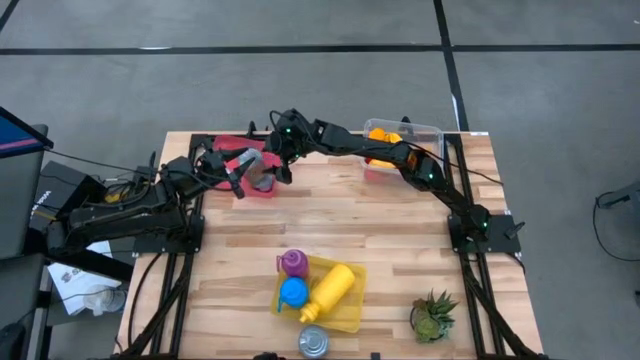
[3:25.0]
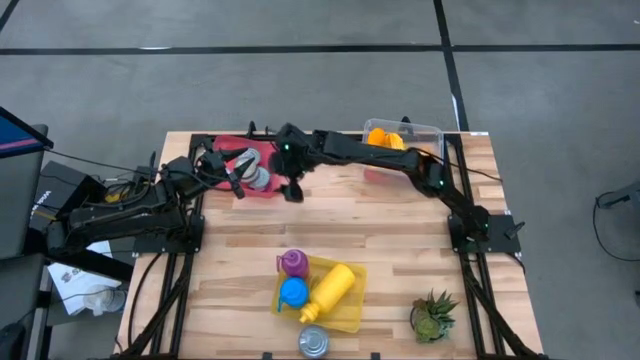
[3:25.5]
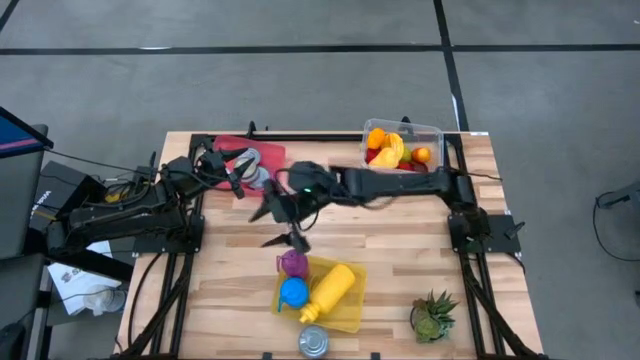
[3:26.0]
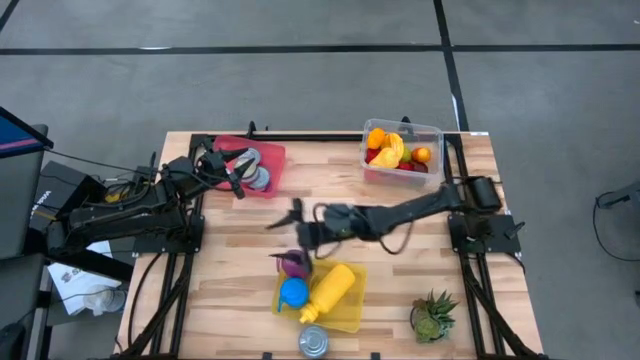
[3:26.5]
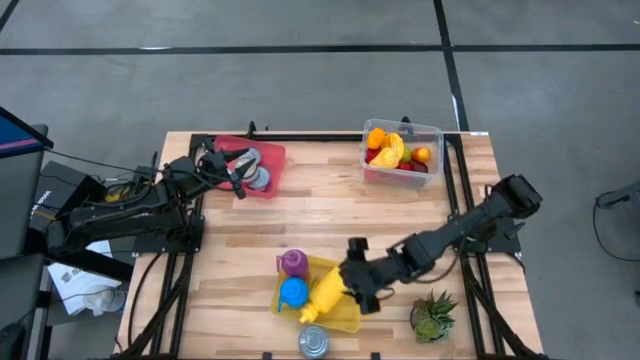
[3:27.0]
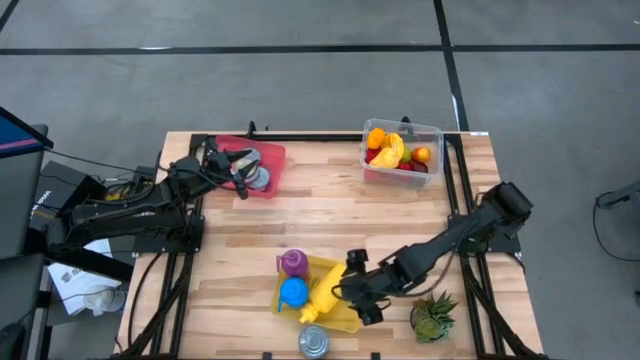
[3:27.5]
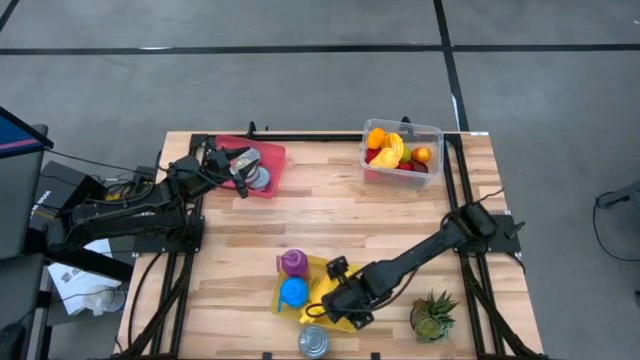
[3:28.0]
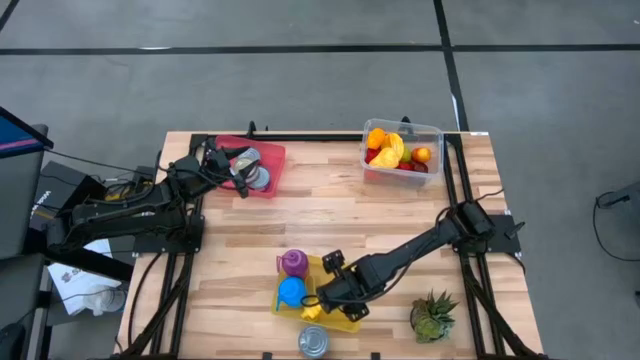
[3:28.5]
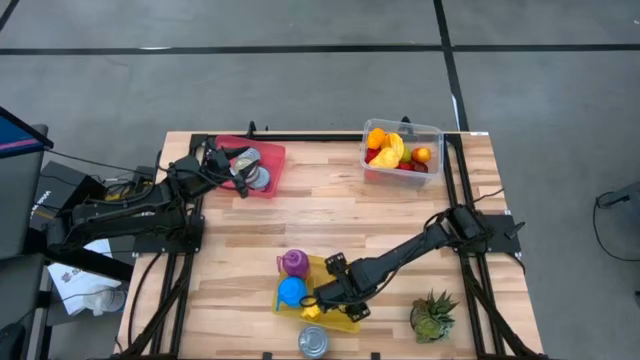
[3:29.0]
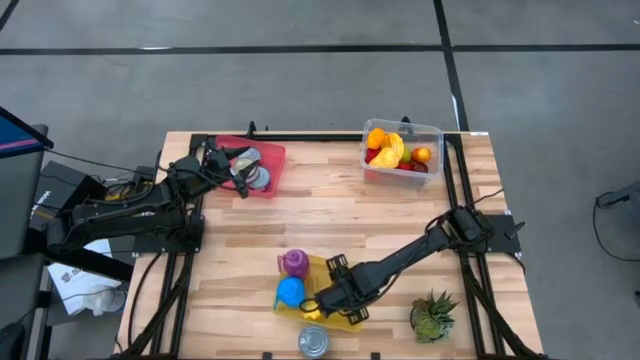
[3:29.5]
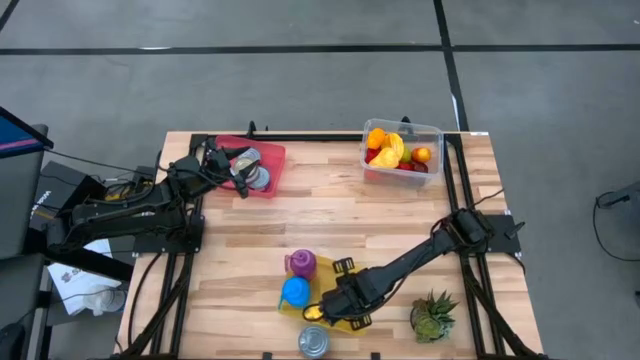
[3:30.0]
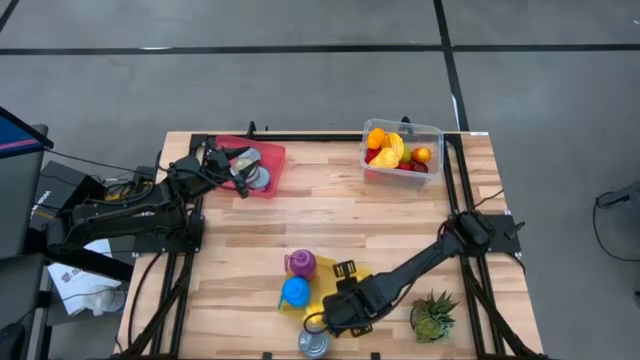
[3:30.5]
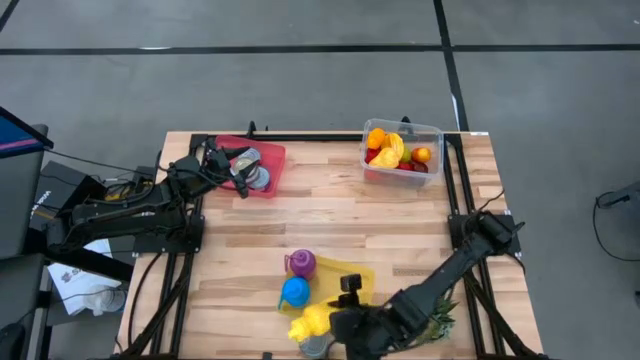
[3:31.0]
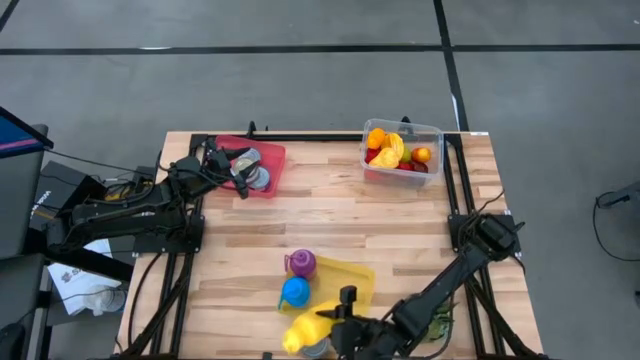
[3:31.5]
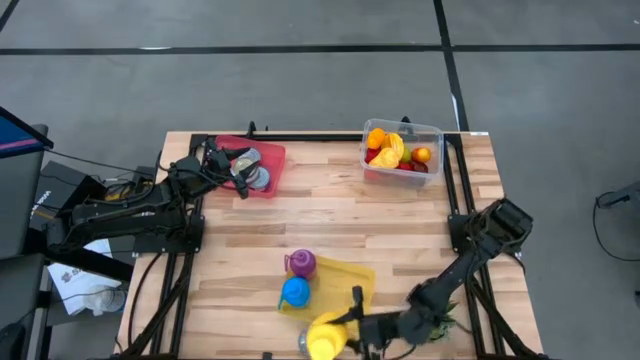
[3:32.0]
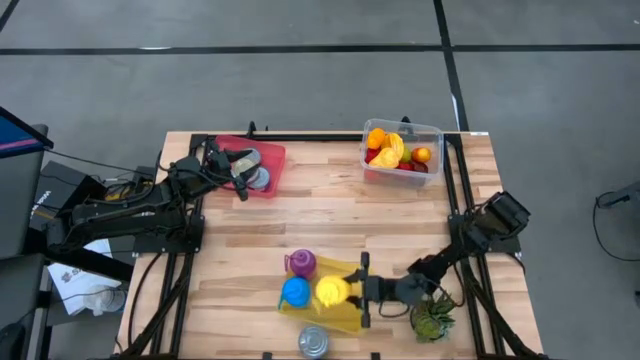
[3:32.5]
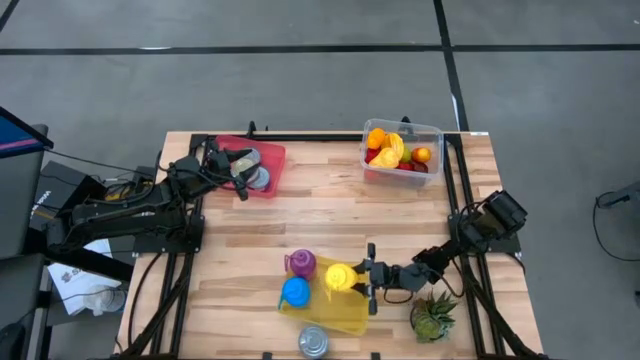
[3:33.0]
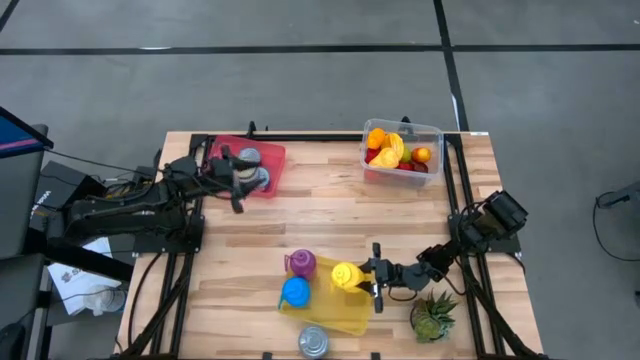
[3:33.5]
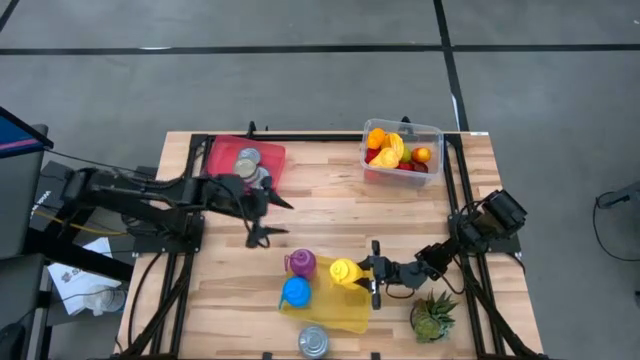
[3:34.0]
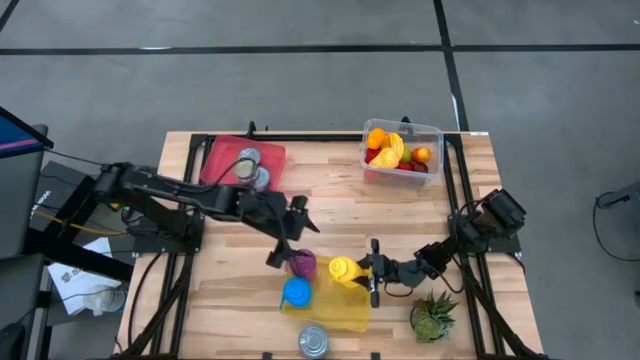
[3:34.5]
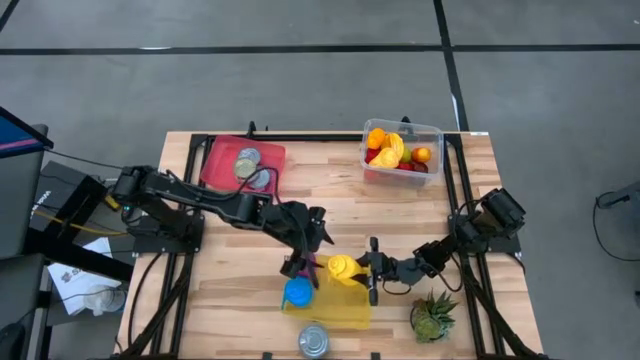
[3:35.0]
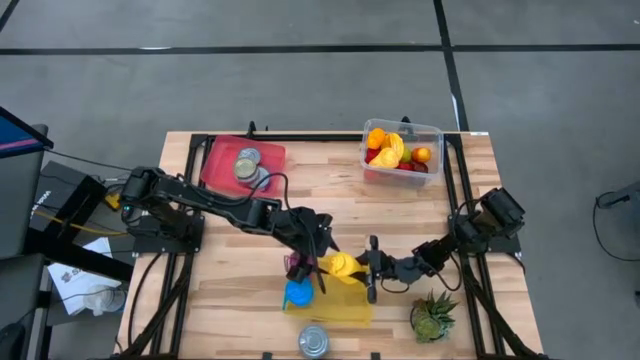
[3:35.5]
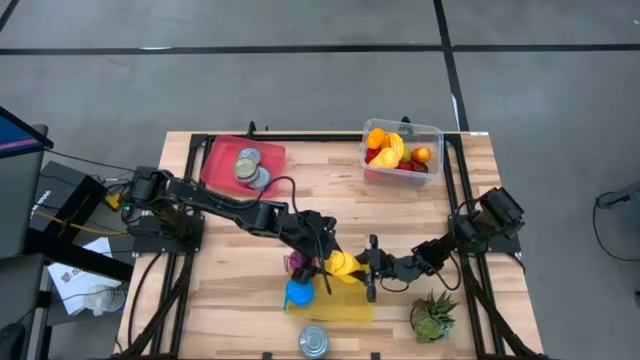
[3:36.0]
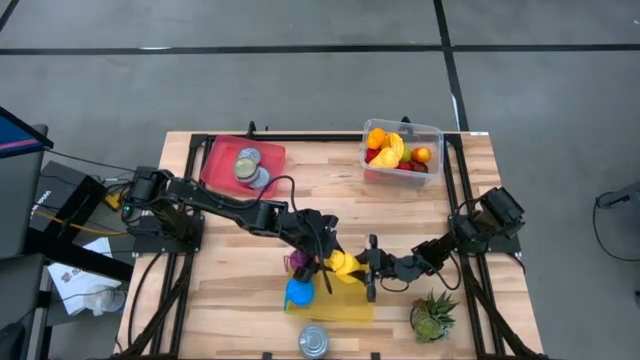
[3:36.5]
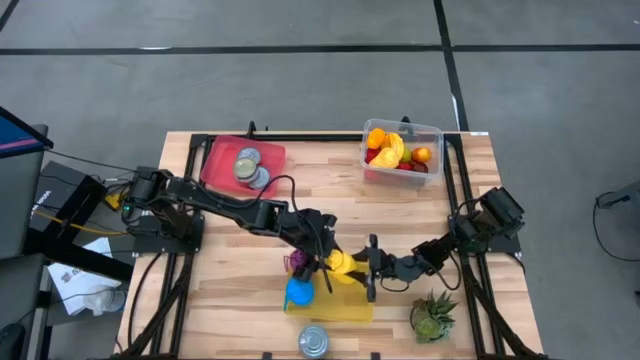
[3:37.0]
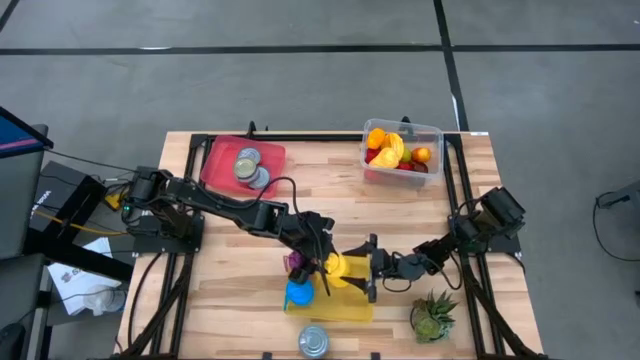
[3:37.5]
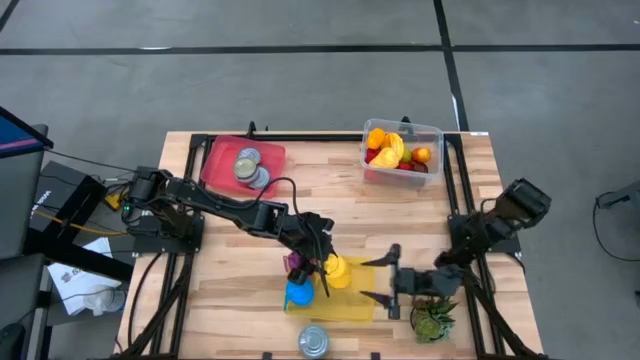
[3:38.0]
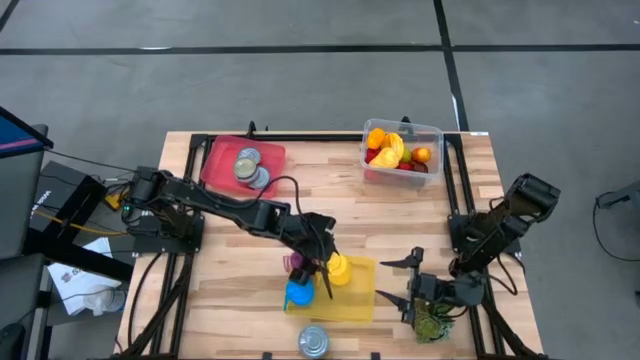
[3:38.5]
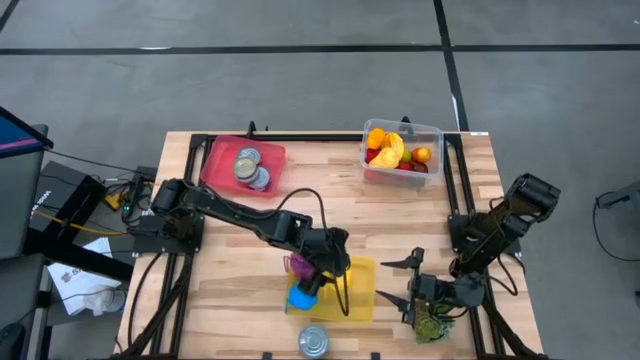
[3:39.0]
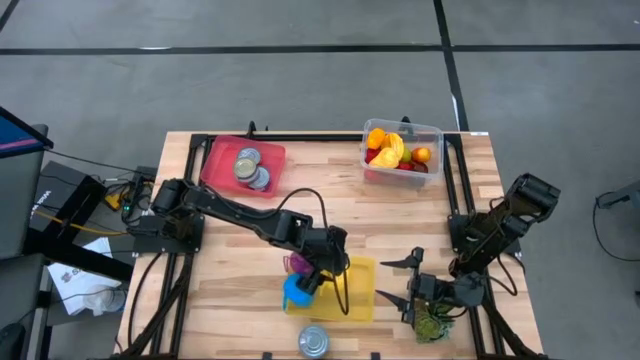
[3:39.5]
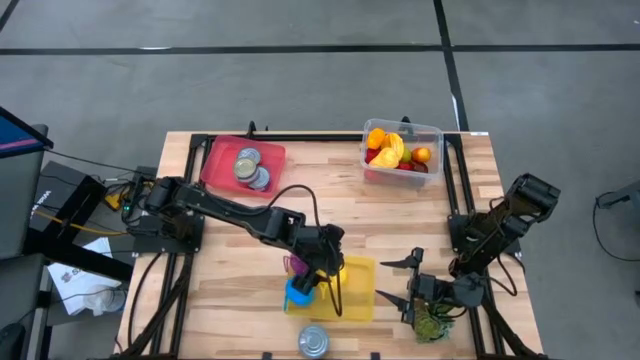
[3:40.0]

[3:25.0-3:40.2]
Task: Pick & Place Food Item
Adjust the yellow water bottle in the yellow bin

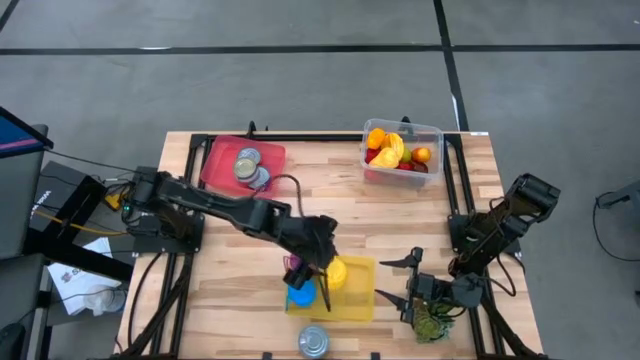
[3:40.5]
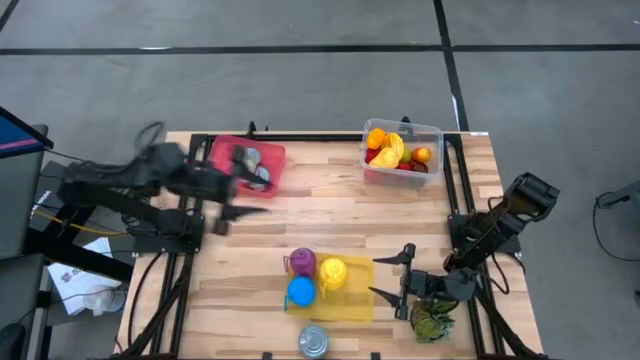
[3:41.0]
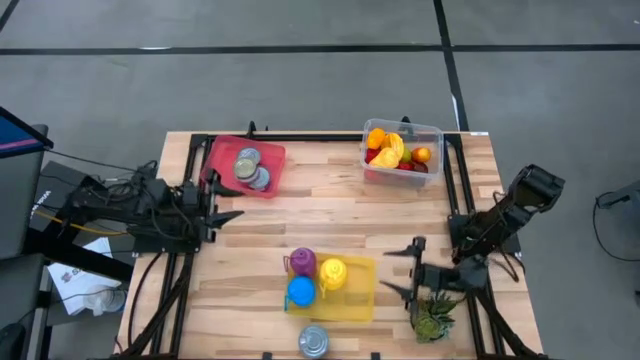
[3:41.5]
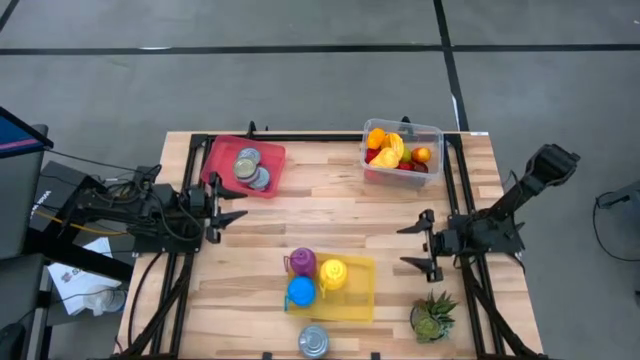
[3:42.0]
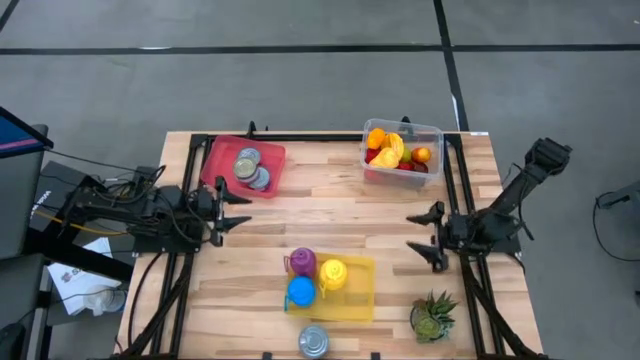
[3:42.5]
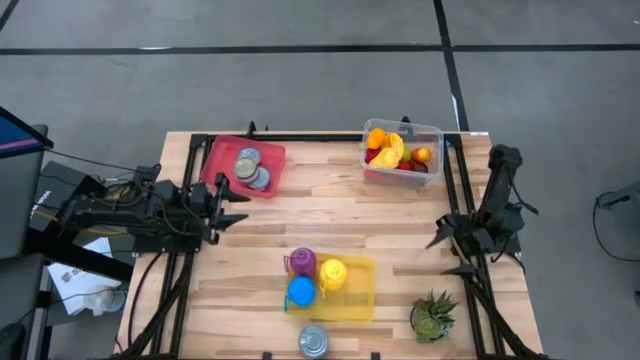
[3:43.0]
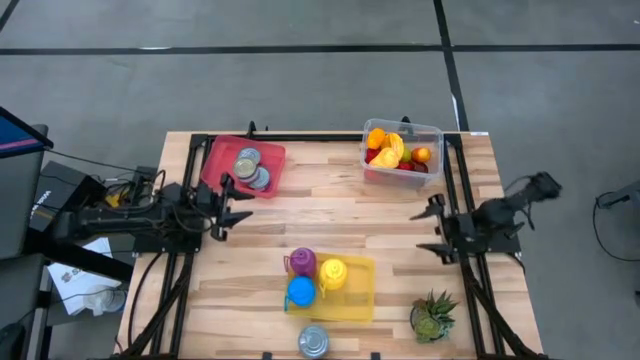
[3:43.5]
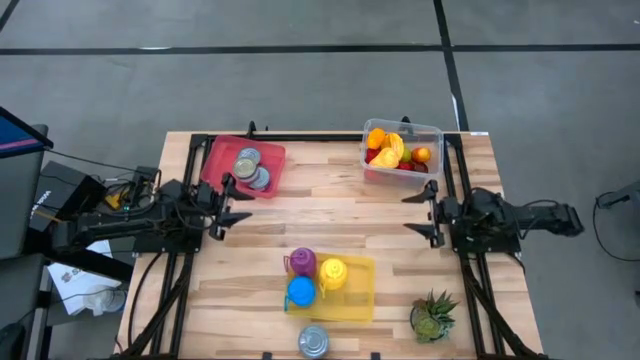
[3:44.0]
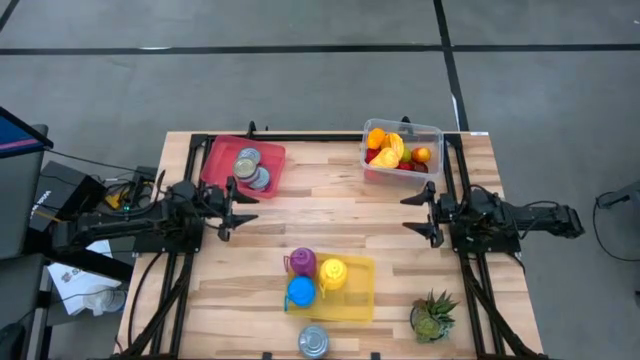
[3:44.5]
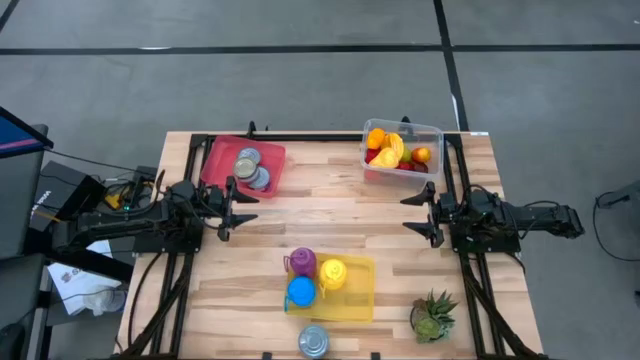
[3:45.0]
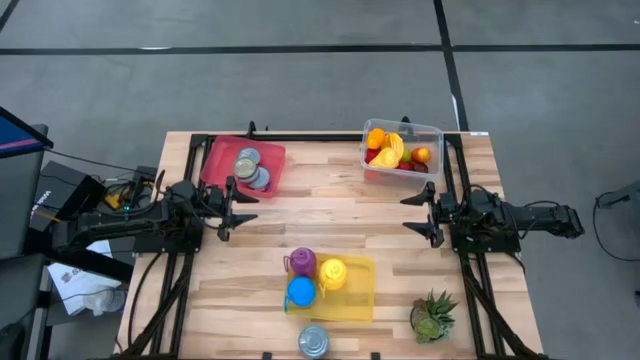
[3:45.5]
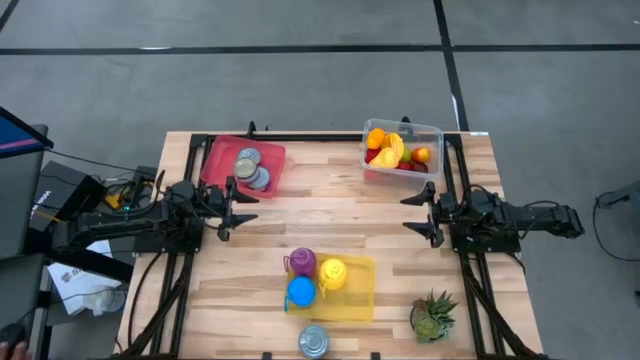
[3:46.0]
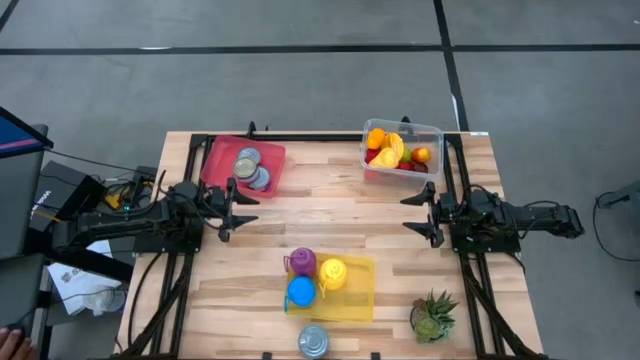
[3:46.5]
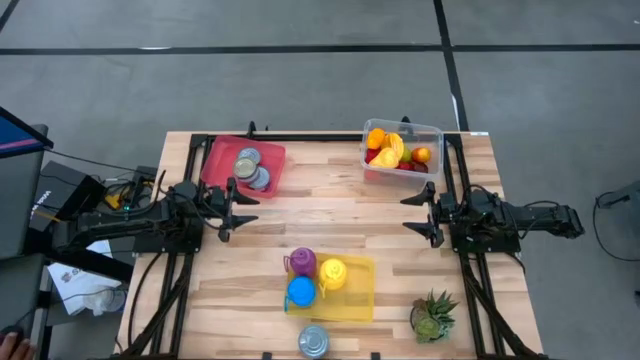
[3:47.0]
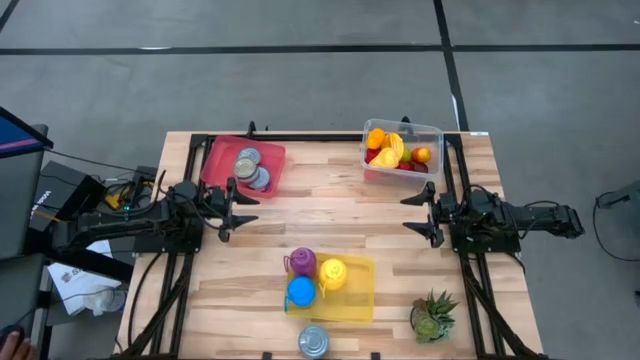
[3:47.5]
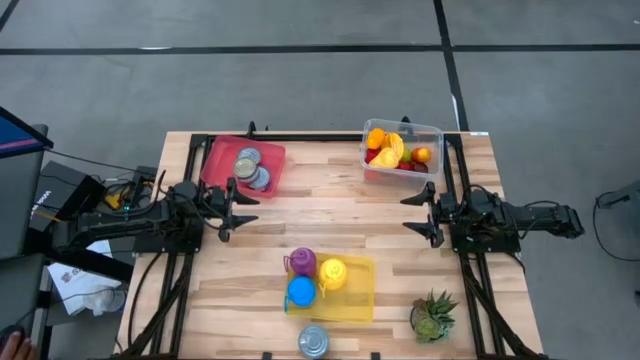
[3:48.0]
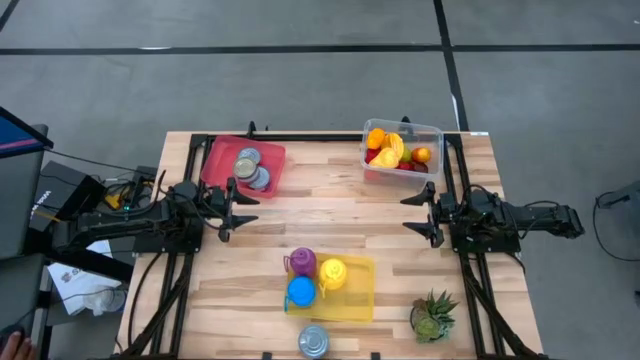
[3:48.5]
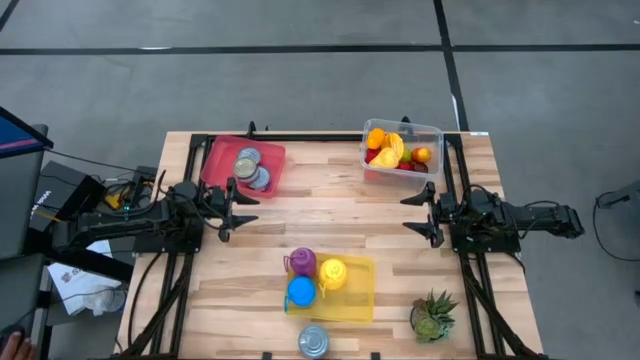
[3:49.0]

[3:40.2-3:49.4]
Return to Home Position
